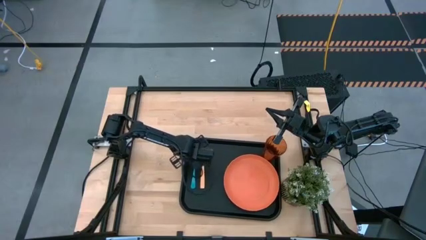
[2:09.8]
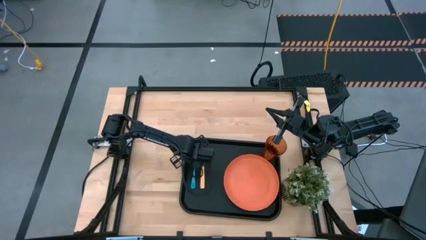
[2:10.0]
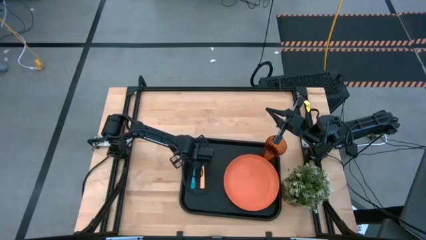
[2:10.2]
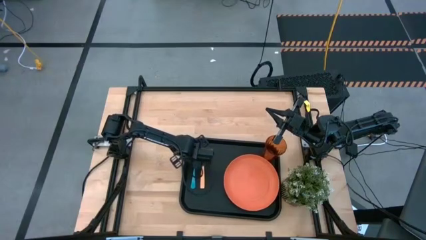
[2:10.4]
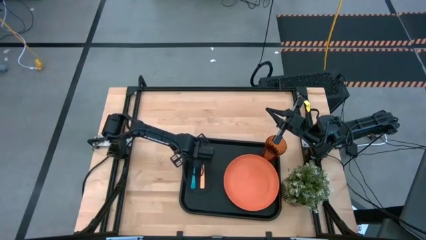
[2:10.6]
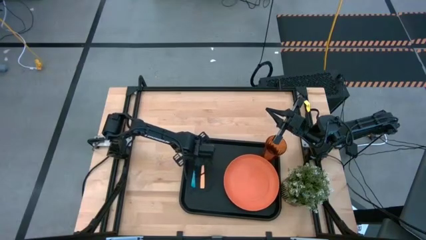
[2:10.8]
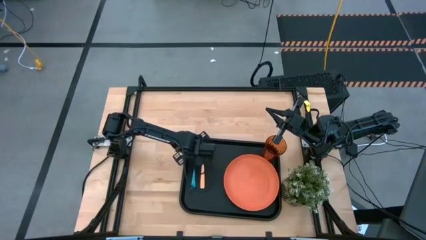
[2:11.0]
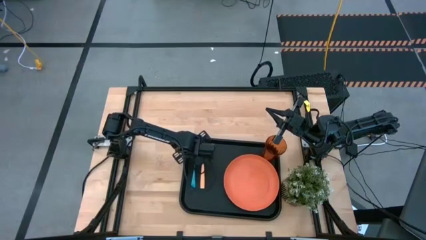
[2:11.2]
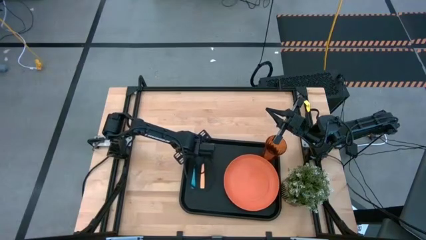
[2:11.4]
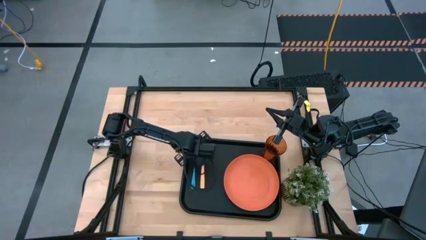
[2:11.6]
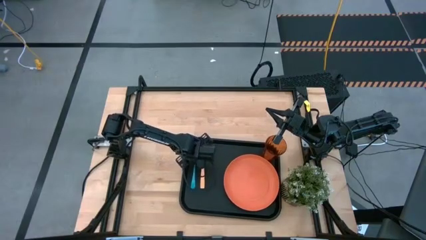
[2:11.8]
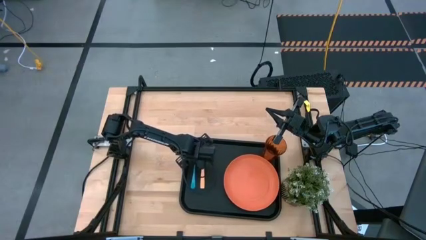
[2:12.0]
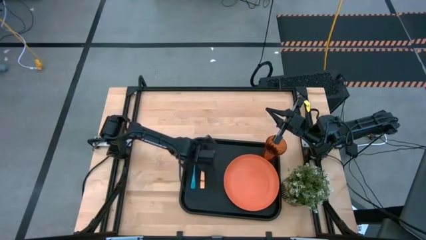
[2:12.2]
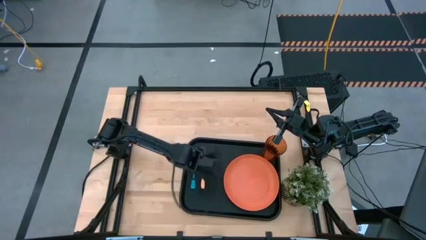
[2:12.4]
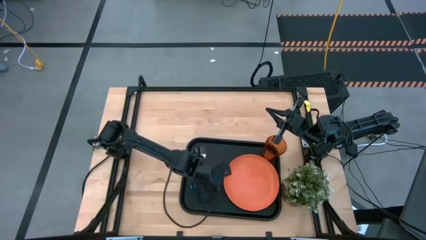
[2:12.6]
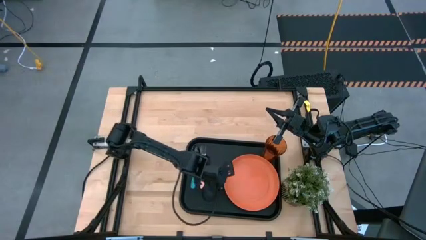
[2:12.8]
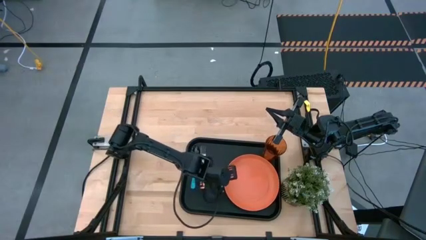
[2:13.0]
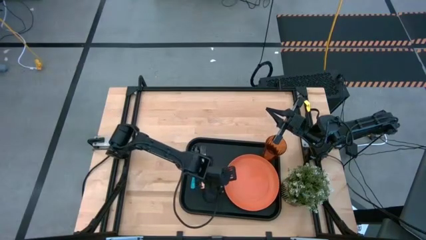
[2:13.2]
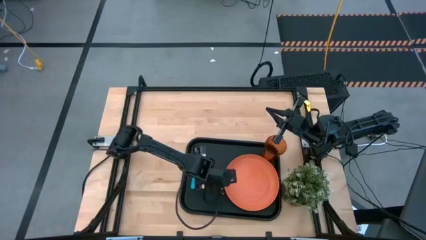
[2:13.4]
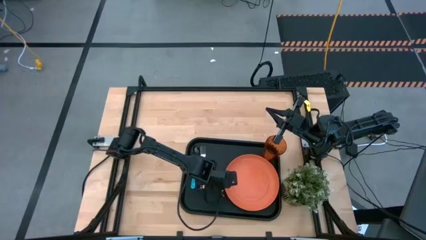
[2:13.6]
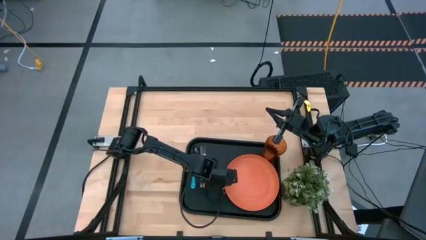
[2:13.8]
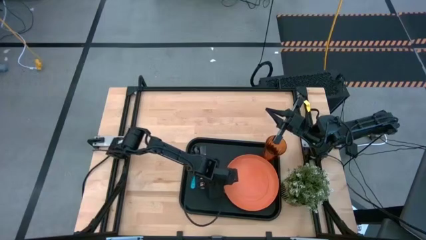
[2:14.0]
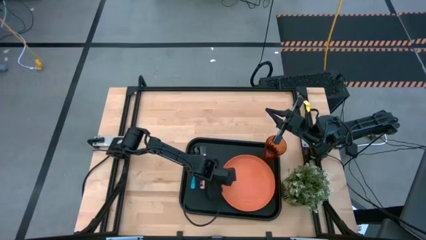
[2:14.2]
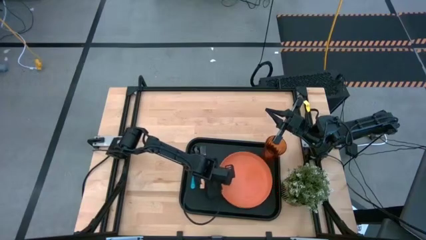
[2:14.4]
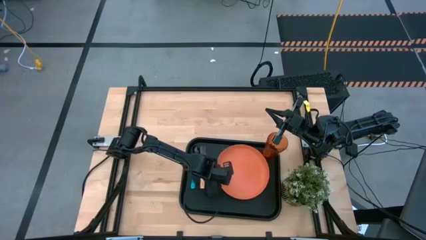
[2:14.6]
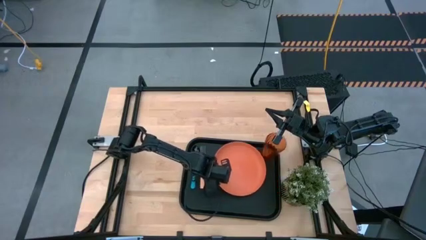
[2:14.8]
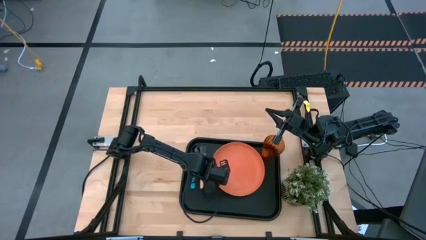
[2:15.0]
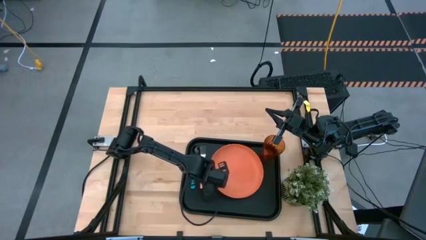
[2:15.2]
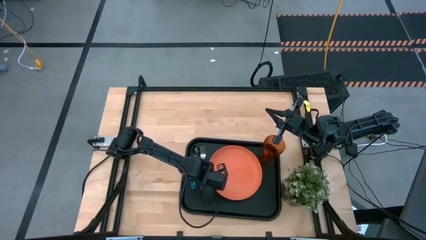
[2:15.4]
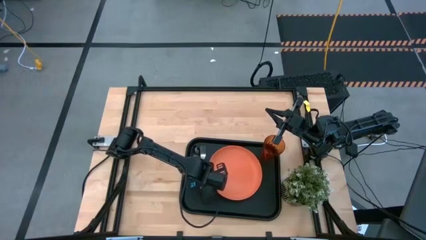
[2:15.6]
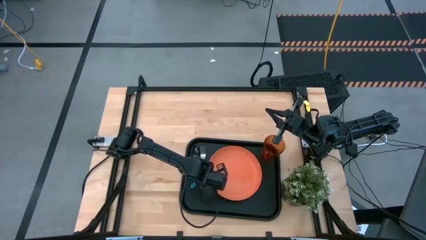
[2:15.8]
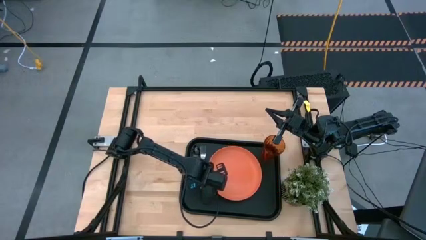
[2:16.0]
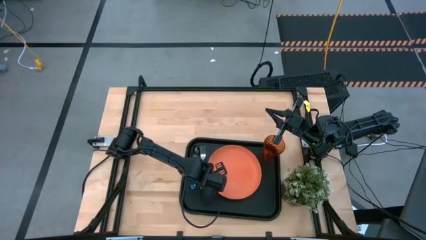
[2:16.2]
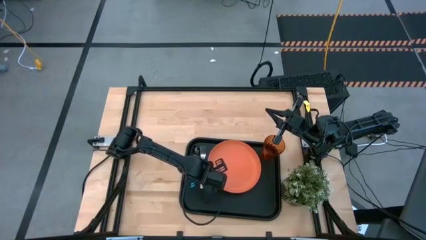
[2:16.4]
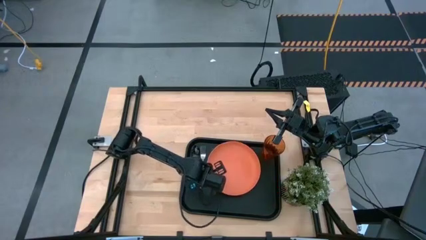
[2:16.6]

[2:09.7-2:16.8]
Task: Pick and place plate/cup/fork/spoon on tray
Adjust the pink plate on the black serving tray

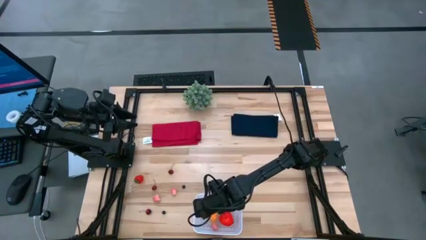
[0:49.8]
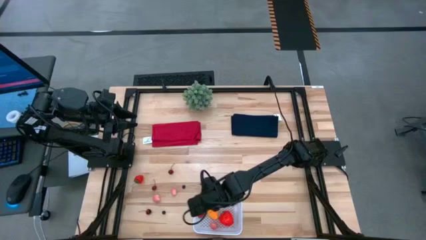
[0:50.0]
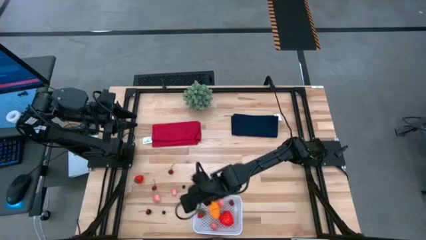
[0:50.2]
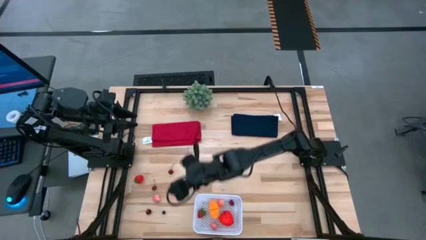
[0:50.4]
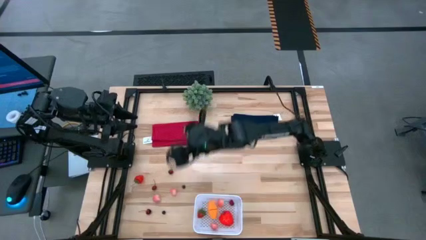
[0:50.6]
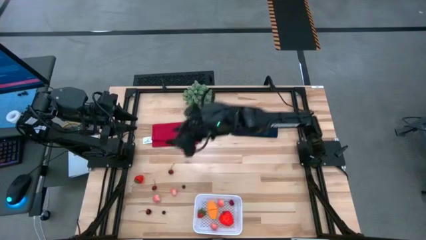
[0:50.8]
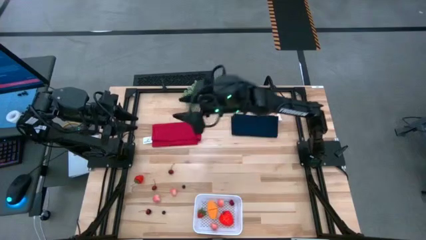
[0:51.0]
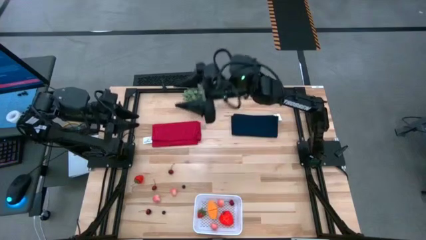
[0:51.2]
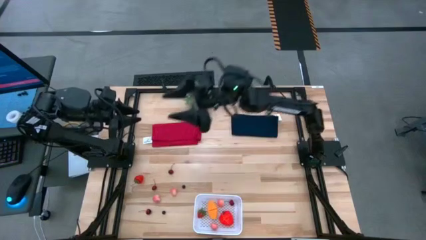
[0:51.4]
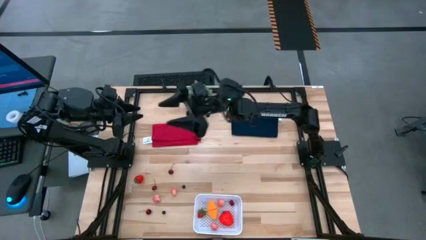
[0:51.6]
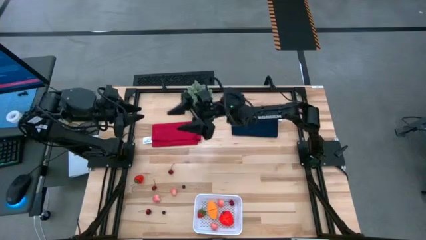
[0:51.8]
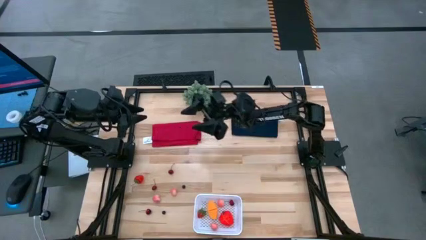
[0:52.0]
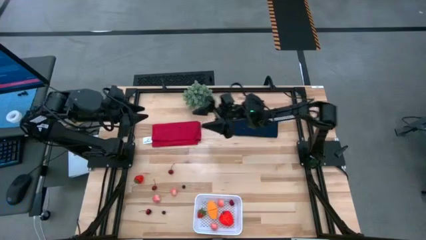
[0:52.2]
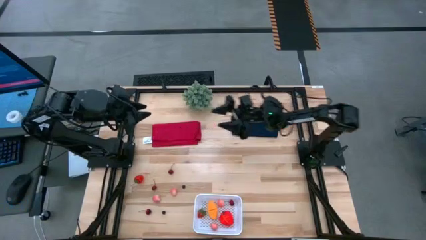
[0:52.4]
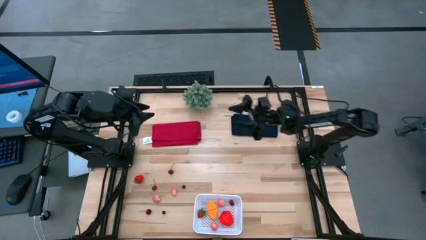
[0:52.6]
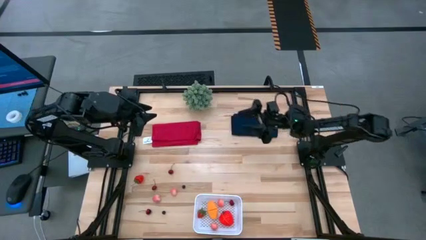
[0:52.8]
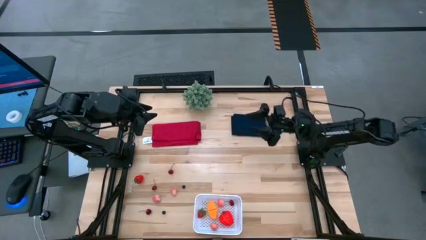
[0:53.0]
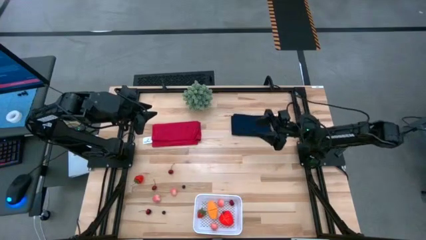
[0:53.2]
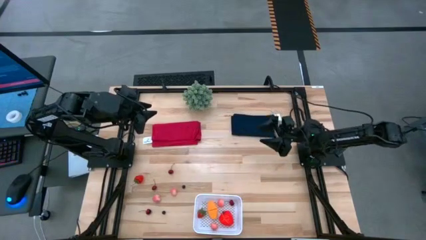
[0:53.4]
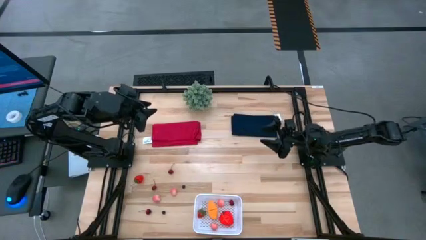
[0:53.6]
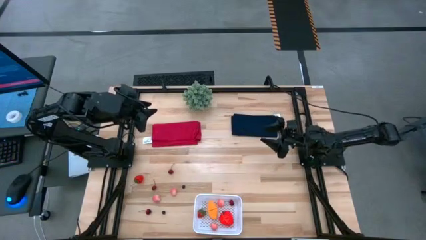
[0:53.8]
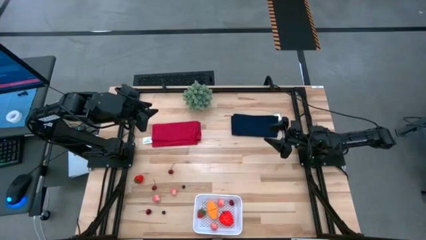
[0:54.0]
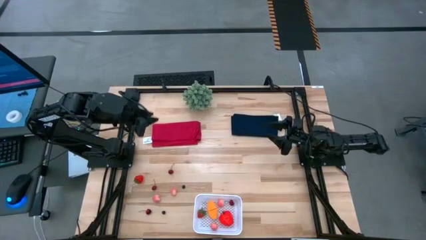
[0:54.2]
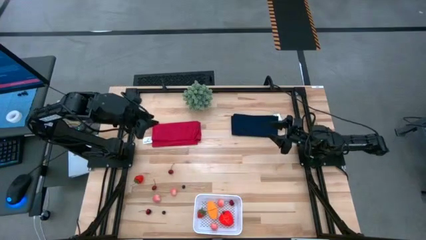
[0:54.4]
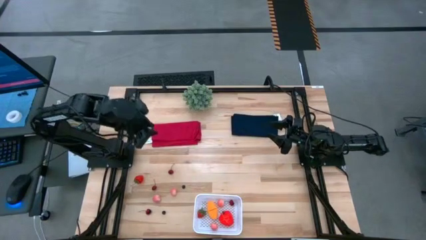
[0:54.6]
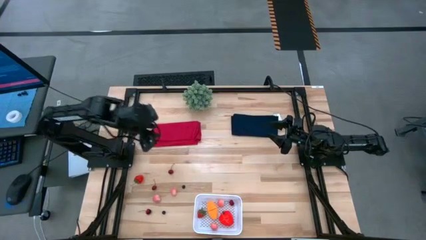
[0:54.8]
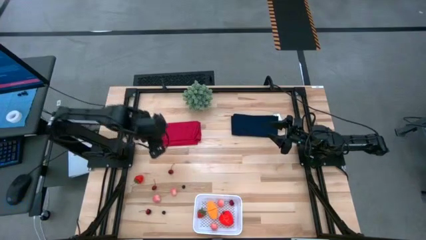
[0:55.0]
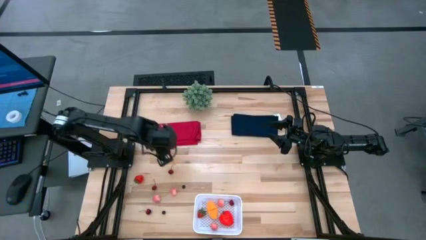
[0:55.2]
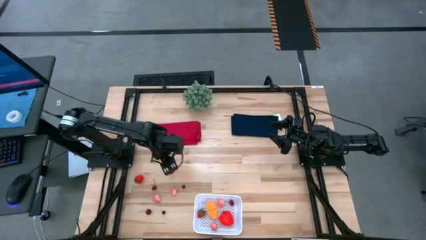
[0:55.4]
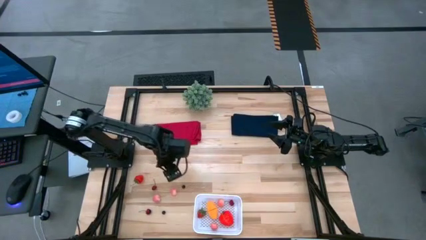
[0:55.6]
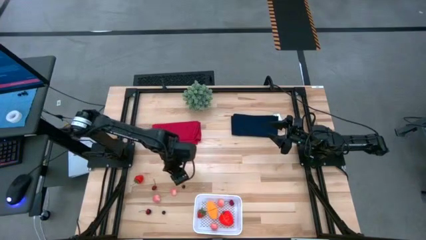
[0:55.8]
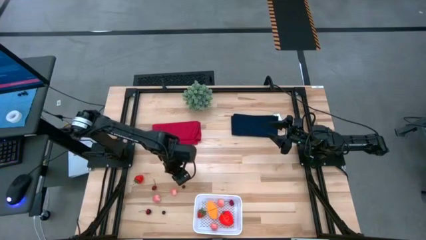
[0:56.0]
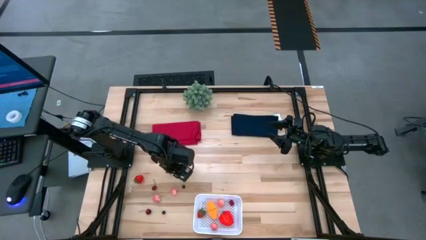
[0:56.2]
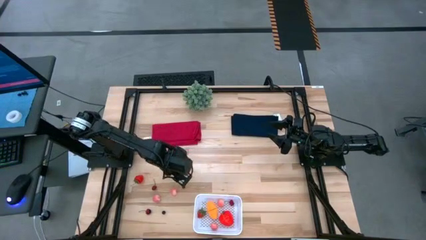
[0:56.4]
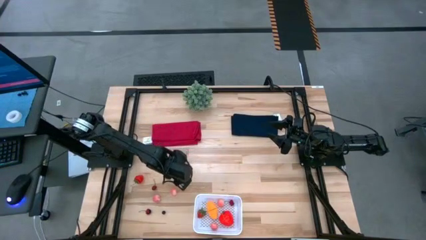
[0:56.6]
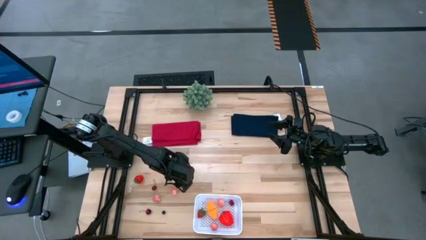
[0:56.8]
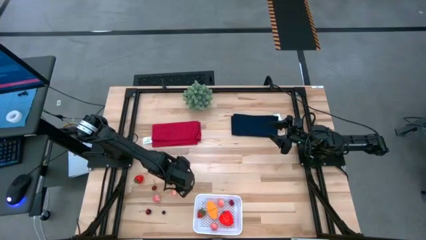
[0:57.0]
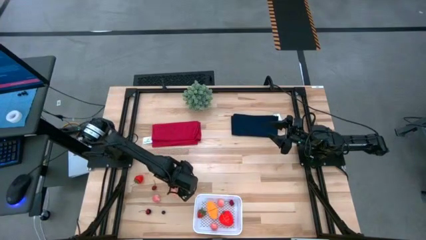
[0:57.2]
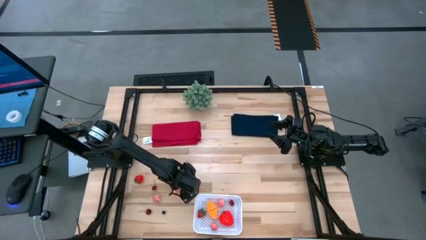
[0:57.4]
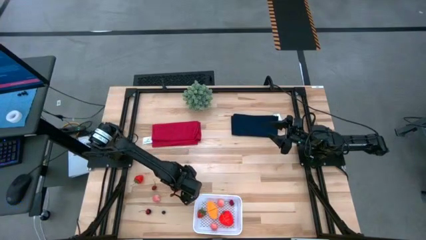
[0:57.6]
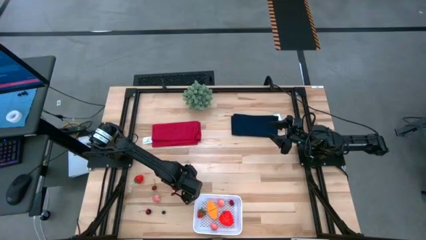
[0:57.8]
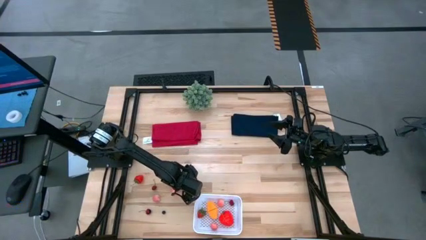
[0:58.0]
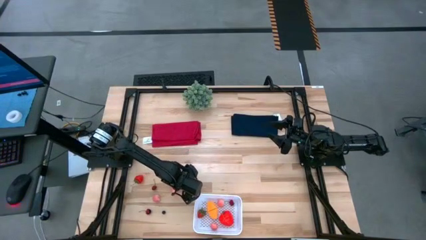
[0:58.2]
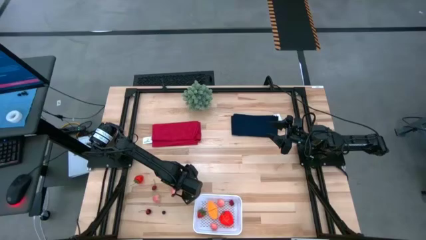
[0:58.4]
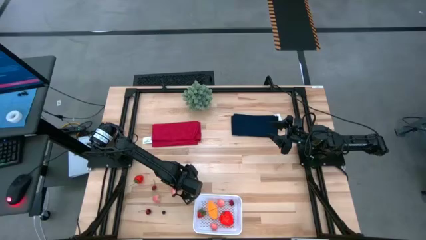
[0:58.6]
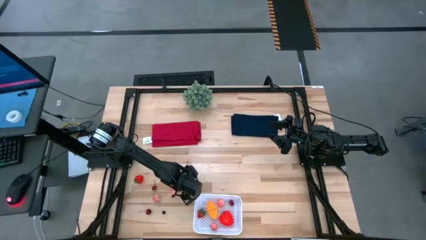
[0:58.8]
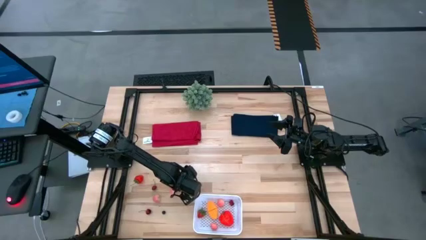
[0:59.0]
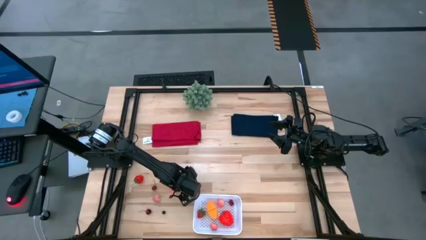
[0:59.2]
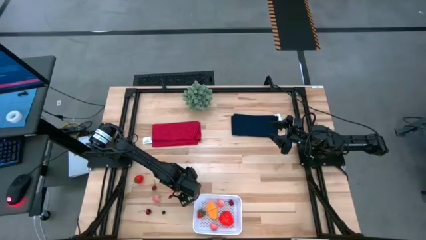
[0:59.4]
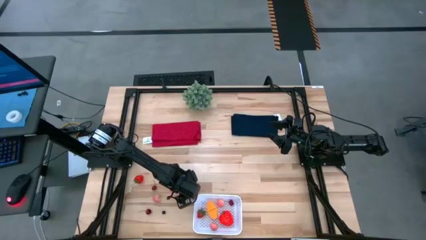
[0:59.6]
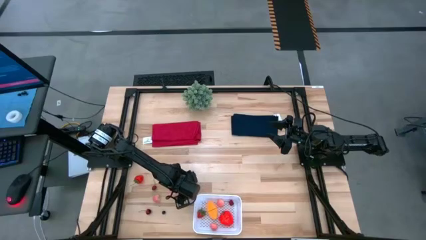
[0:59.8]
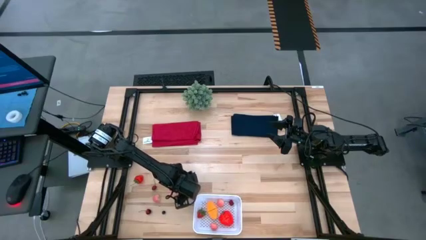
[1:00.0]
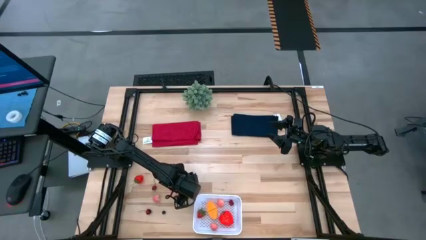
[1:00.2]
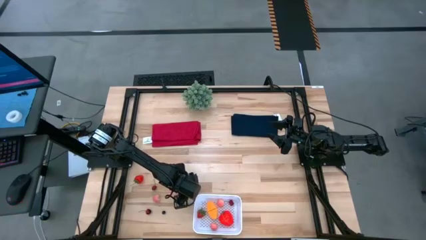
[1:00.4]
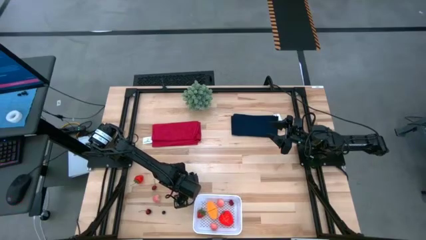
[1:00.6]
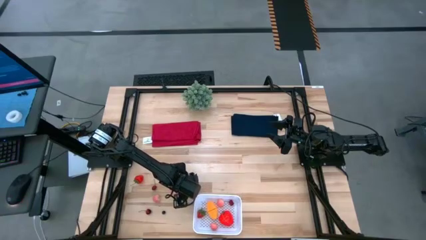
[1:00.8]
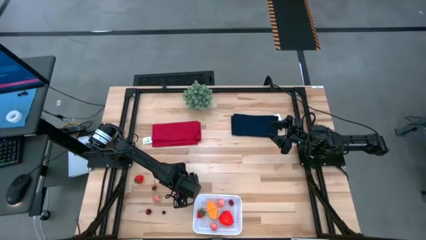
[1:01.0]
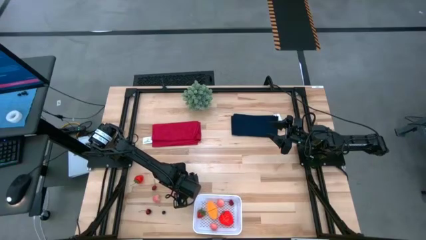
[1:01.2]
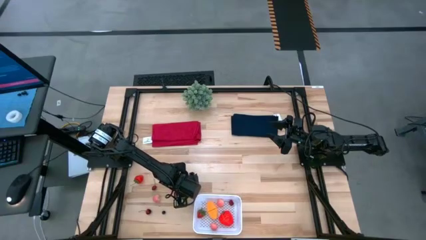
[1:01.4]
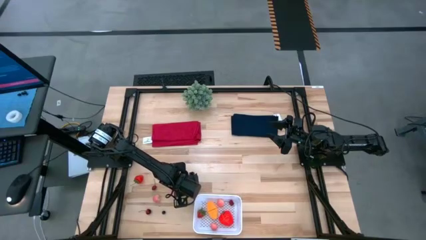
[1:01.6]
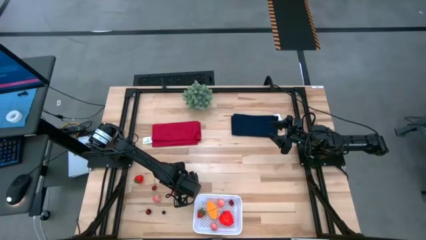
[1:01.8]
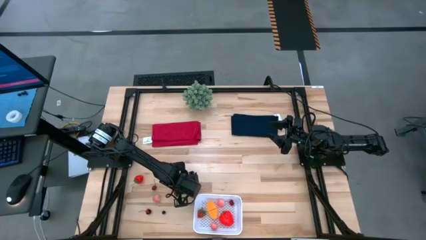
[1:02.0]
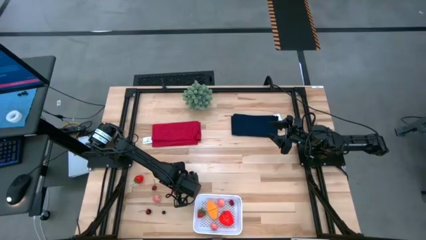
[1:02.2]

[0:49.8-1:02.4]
Task: Pick and placing Produce into tupperware
Put the top blueberry into the white bin
